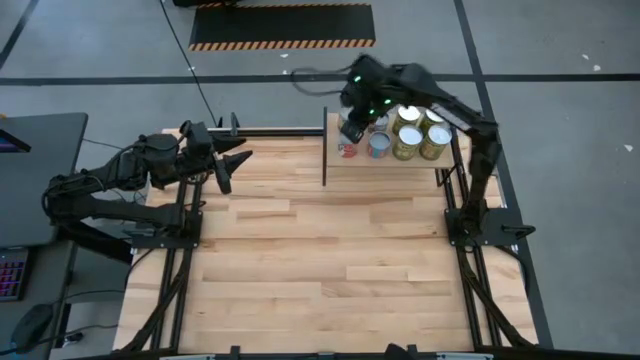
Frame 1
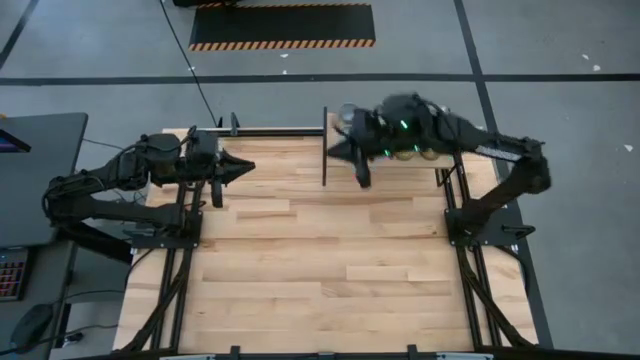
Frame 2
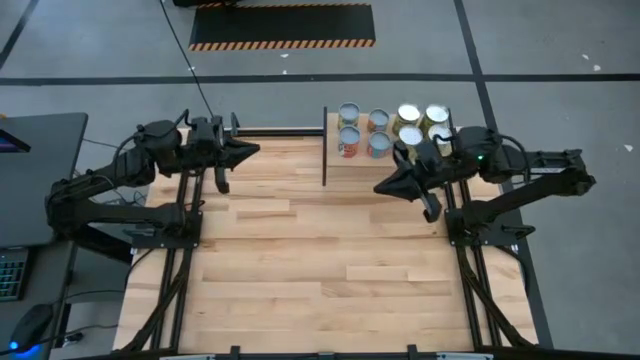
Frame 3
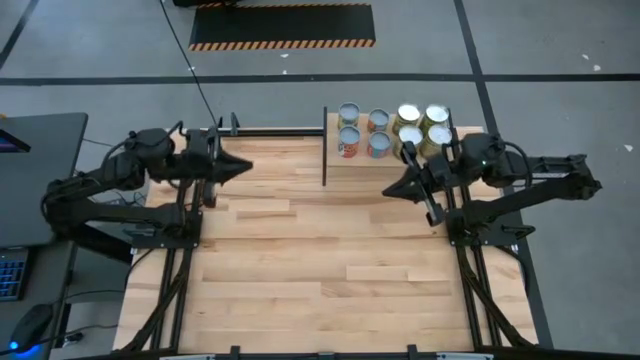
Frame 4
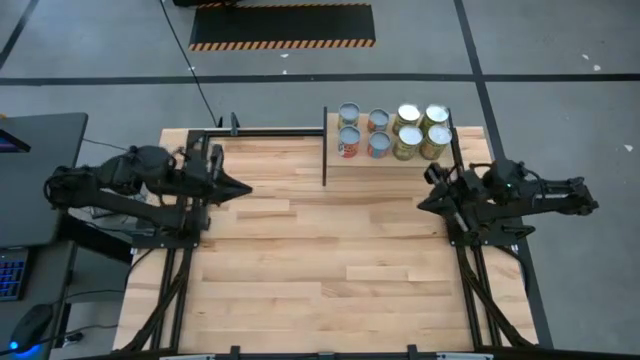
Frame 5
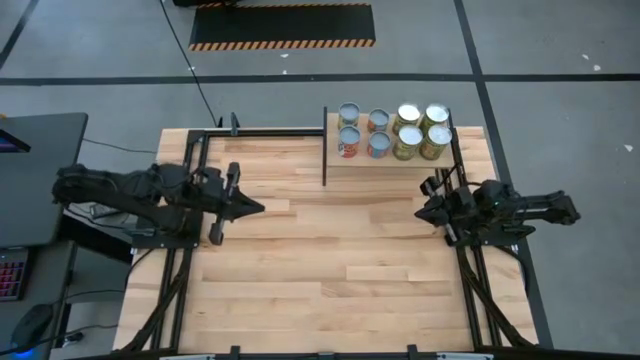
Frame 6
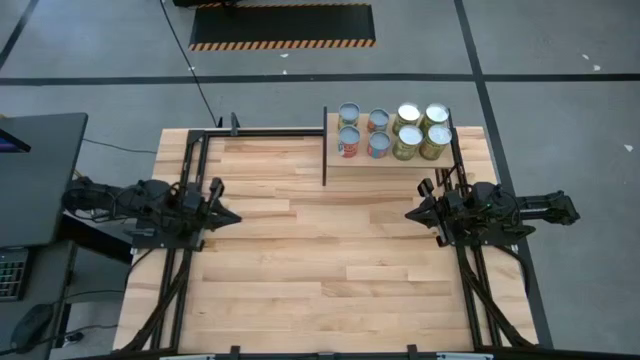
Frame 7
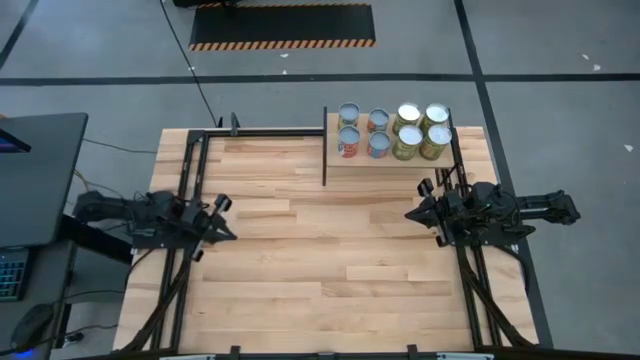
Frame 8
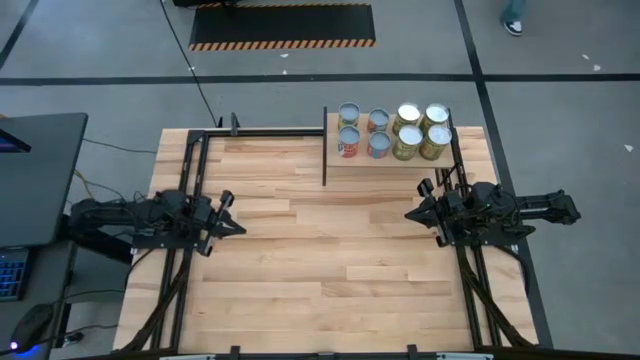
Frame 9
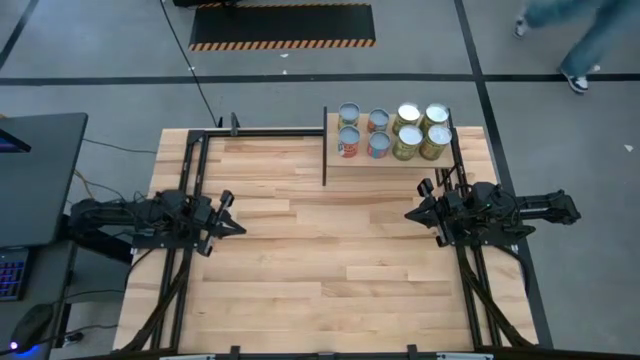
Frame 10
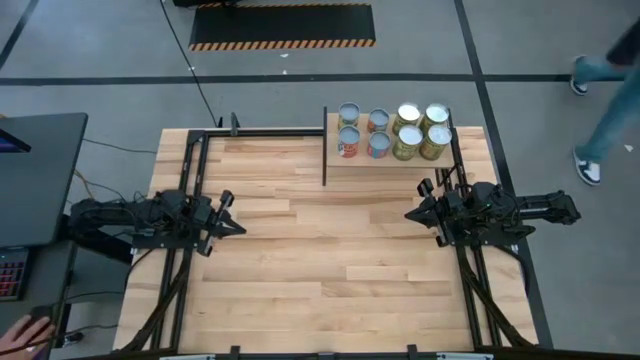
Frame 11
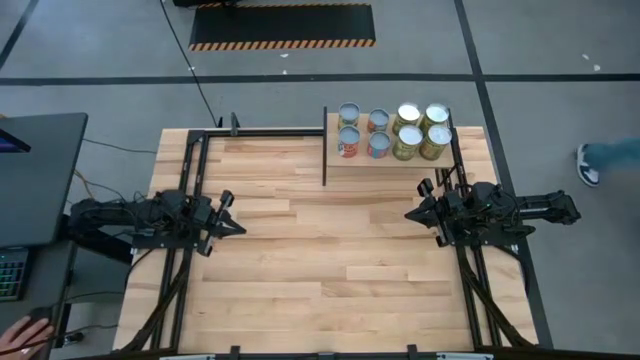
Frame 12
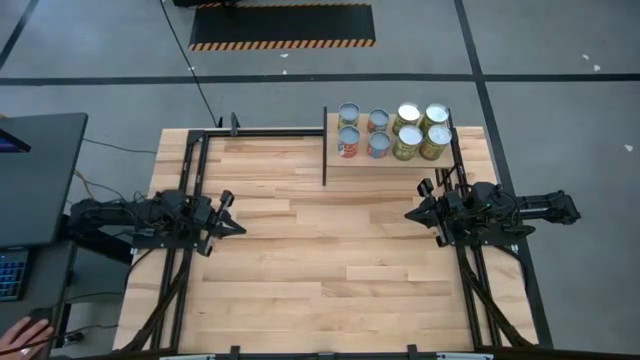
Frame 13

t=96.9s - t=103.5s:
Task: Pick and place cans onto a shelf
Return to Home Position

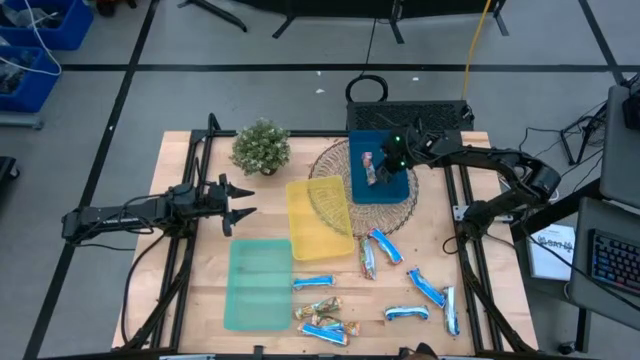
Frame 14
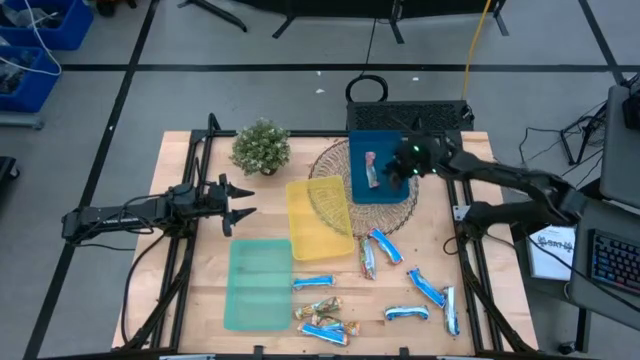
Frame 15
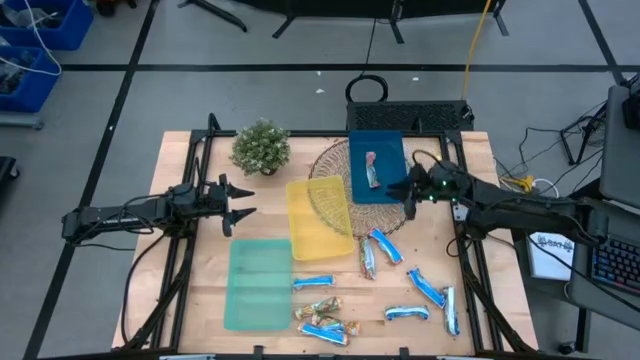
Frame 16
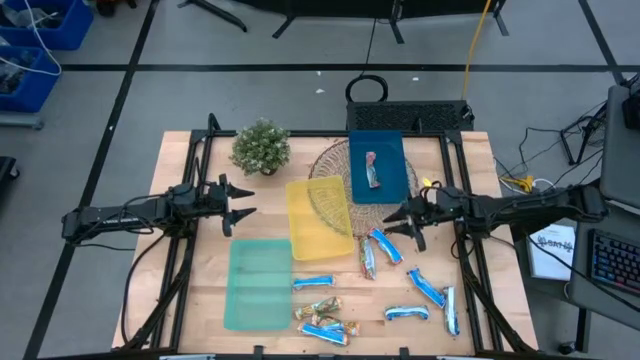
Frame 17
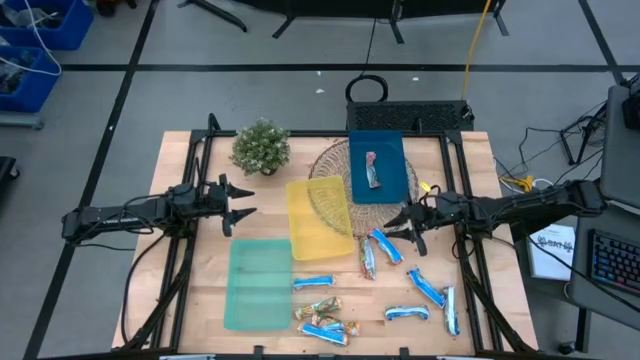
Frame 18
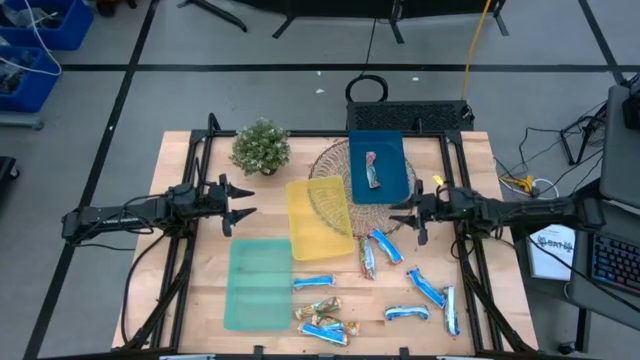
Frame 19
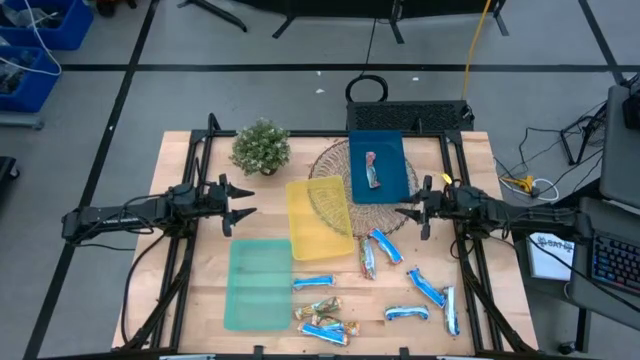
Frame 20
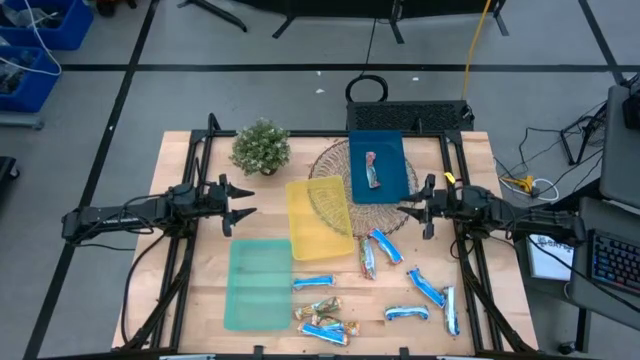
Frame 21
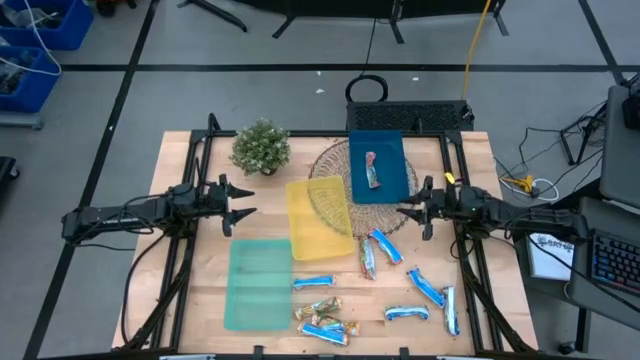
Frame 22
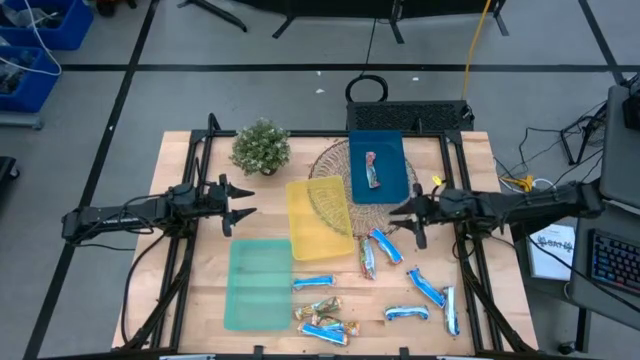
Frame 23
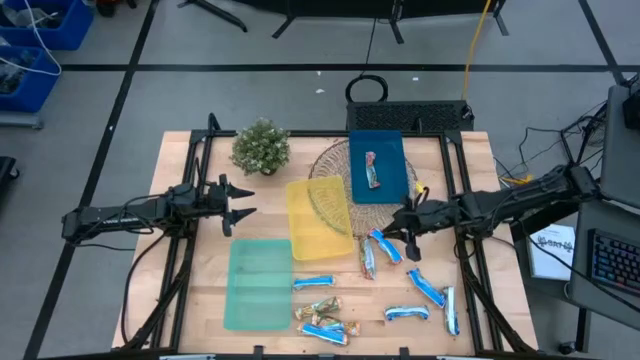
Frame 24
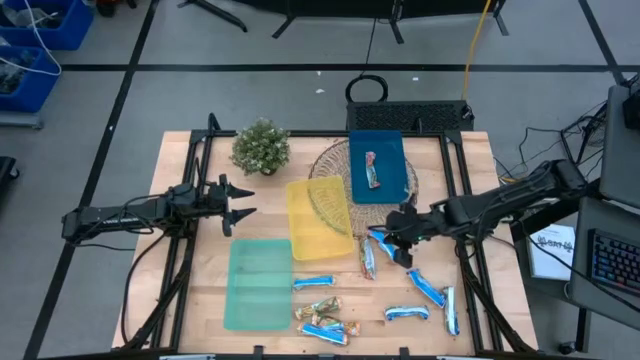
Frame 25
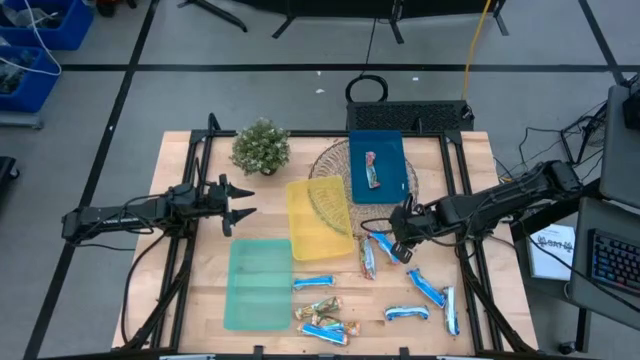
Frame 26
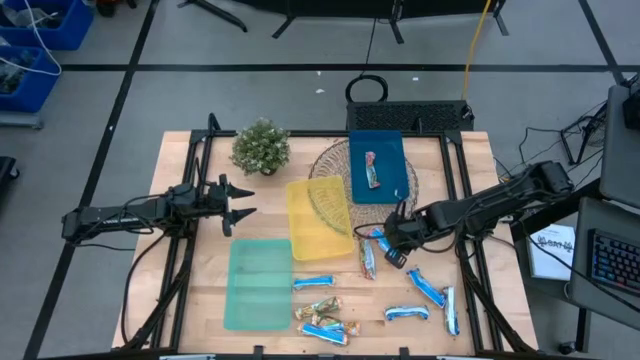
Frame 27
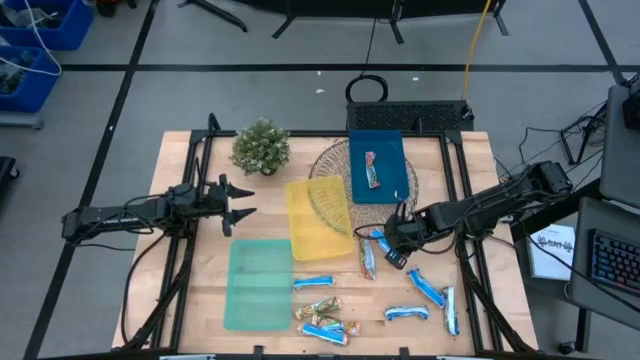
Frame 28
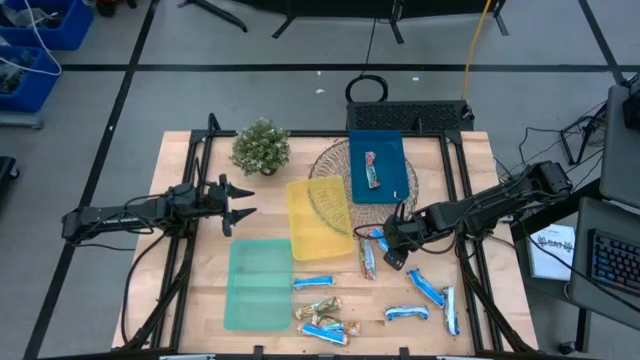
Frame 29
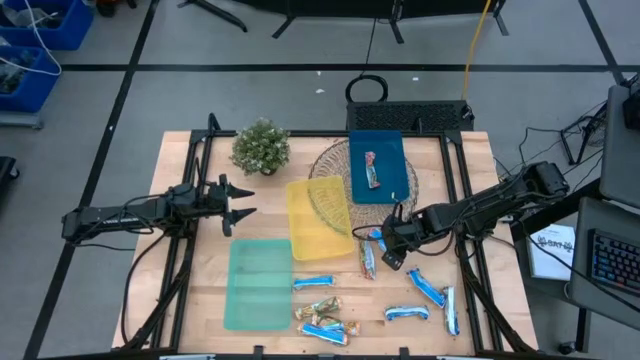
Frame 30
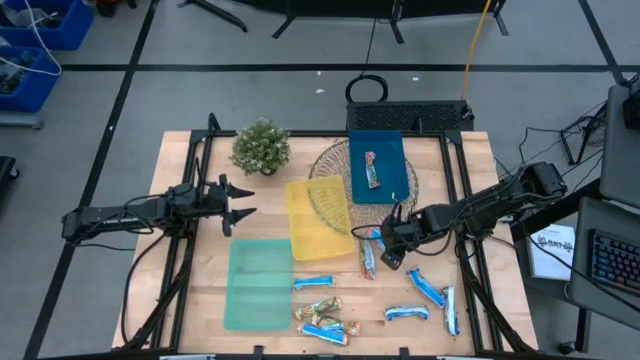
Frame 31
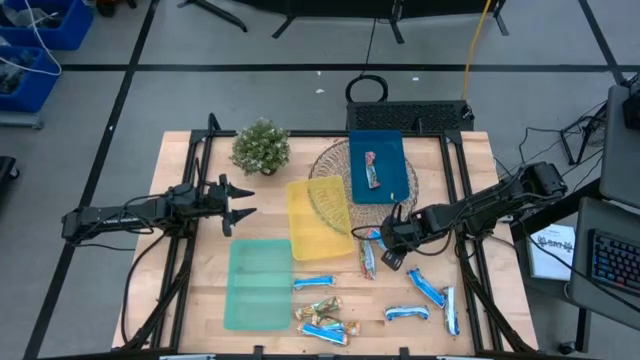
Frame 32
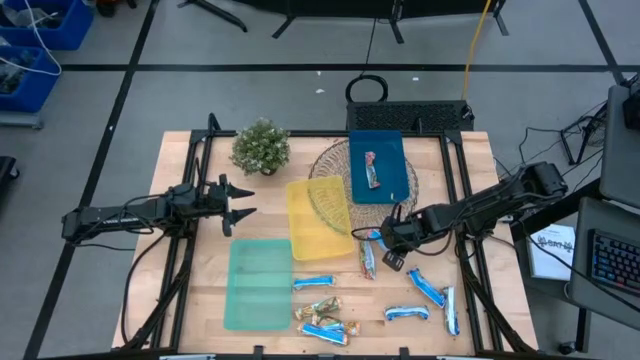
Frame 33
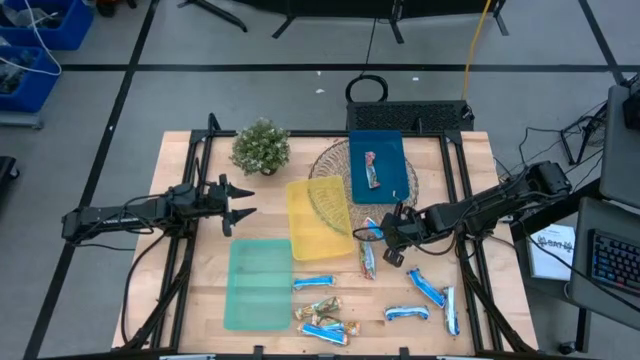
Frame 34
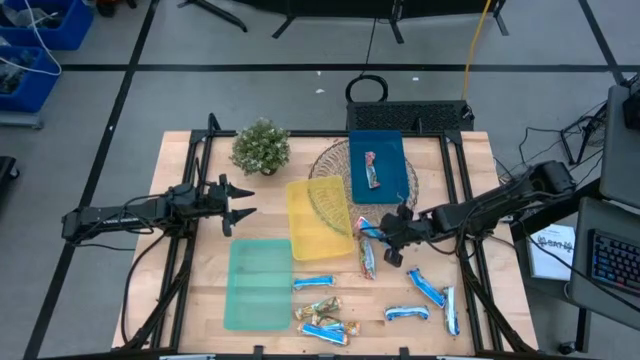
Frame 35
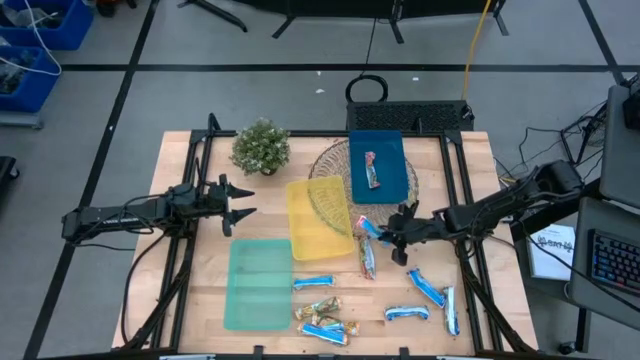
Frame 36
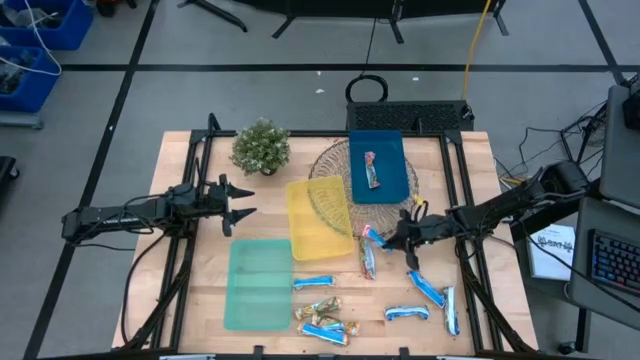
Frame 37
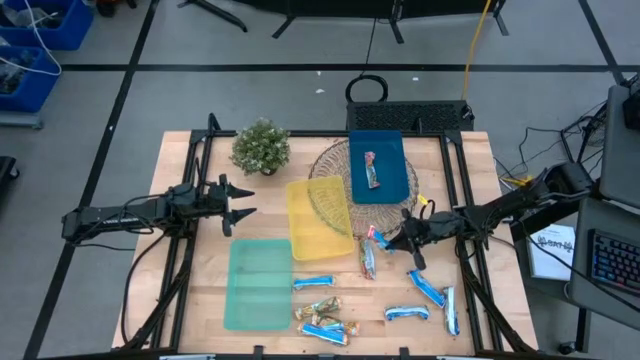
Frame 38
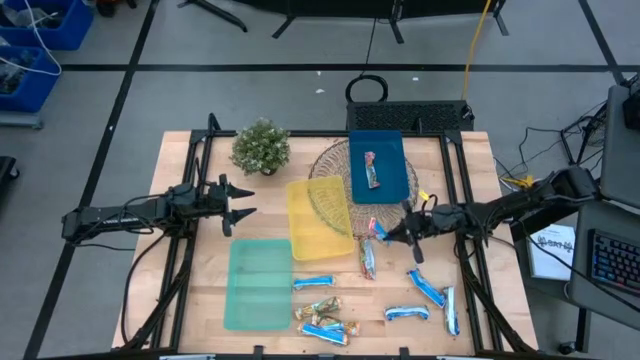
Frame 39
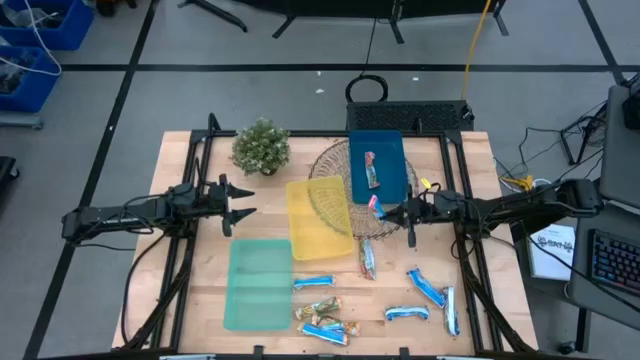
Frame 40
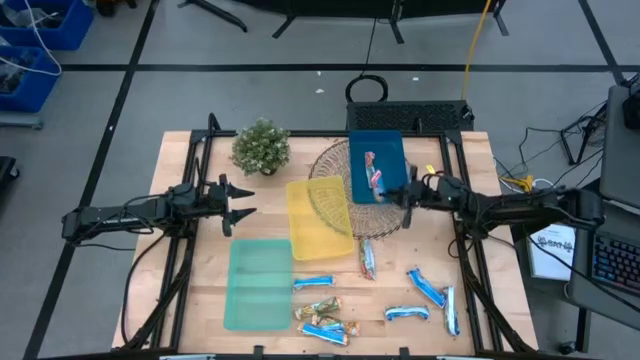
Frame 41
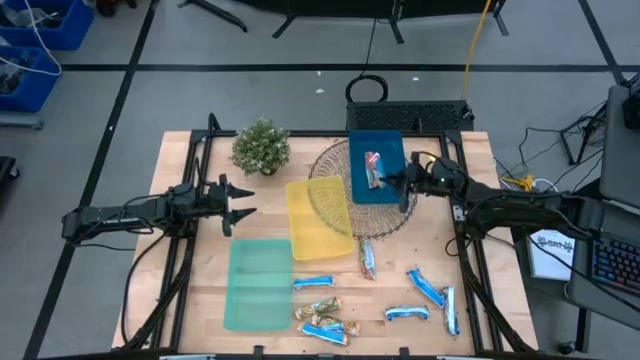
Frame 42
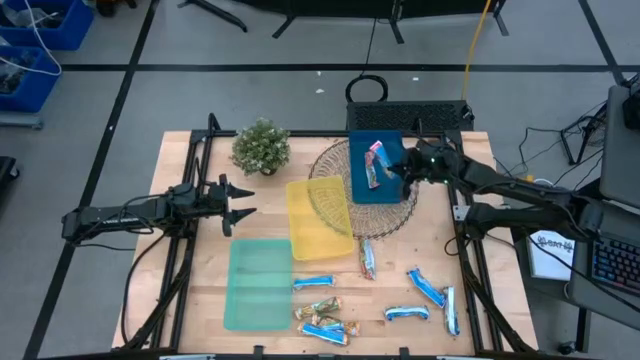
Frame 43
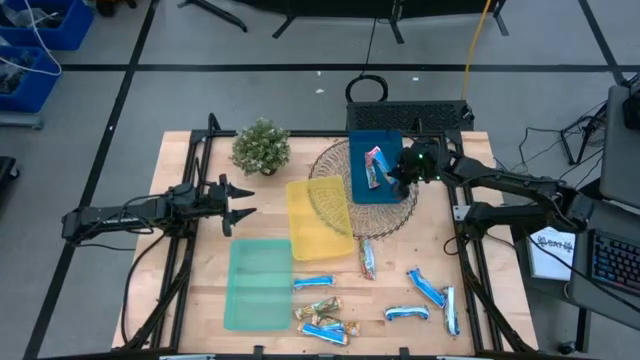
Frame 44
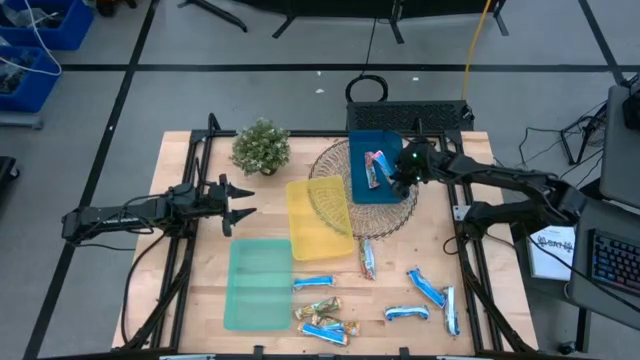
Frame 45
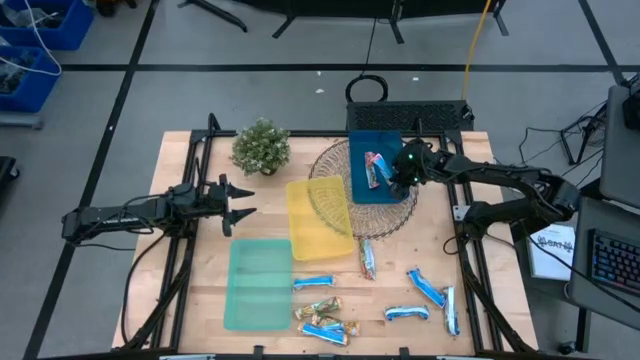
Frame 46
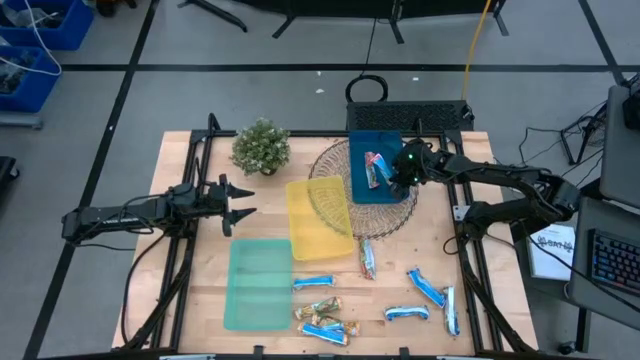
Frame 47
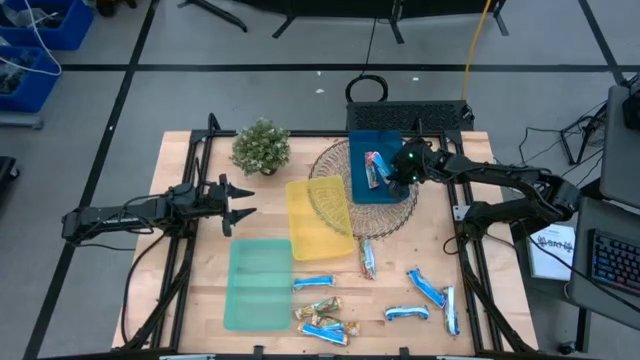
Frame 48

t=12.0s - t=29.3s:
Task: Pick and place Granola Bars by type
Put the red granola bar into the blue bin
